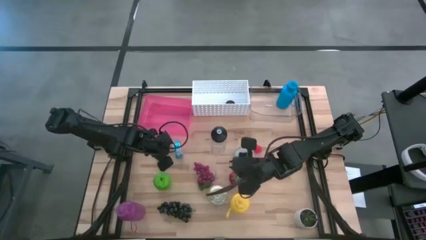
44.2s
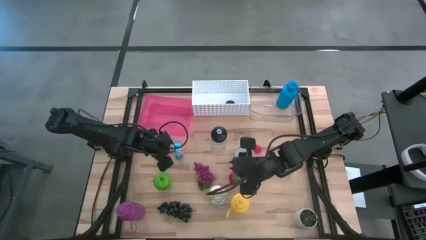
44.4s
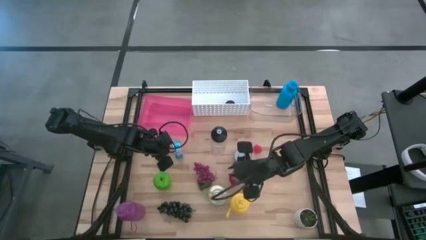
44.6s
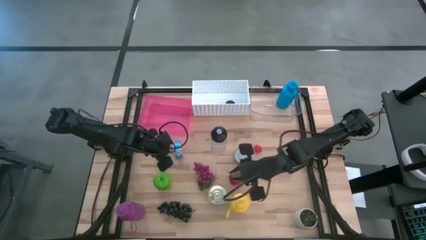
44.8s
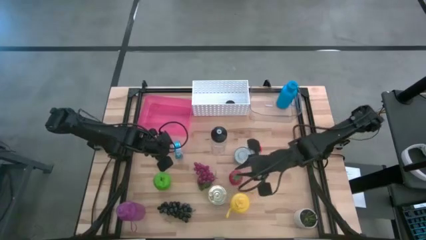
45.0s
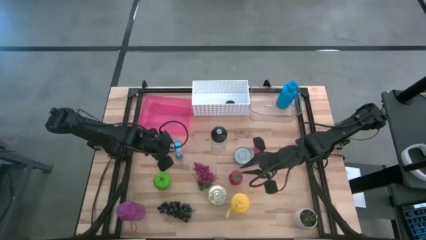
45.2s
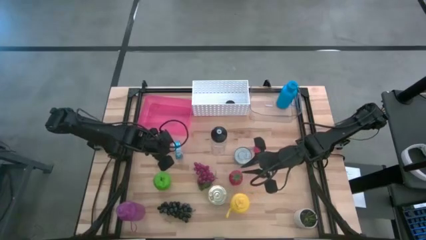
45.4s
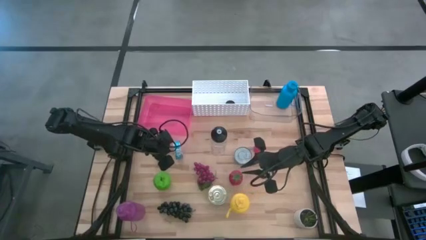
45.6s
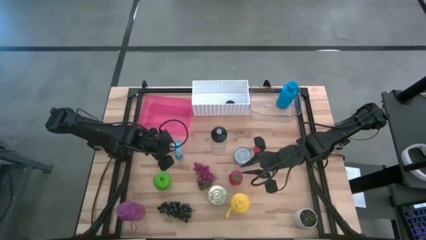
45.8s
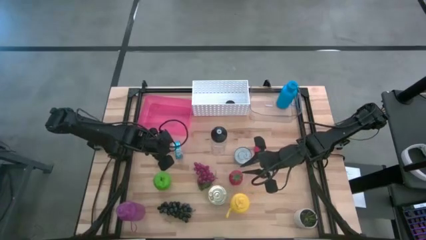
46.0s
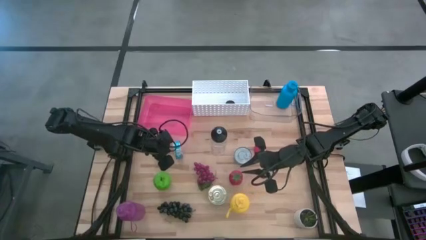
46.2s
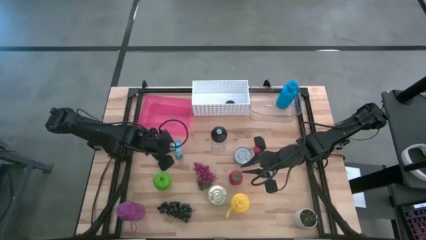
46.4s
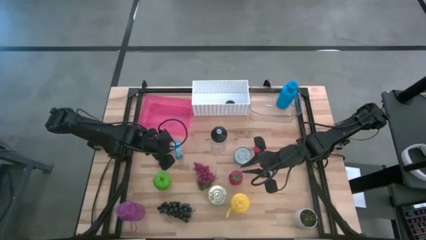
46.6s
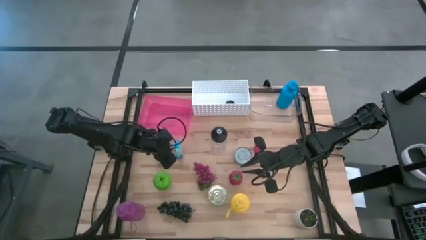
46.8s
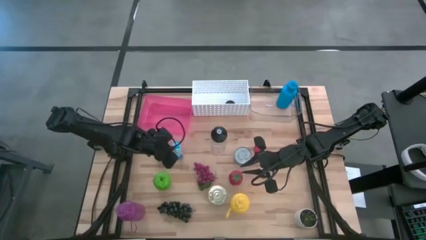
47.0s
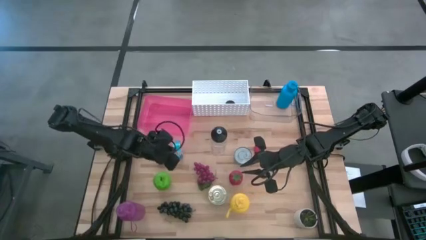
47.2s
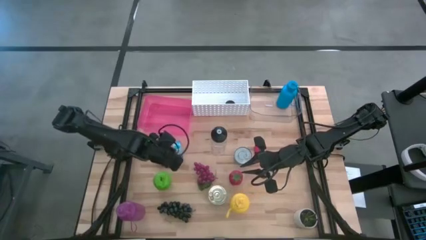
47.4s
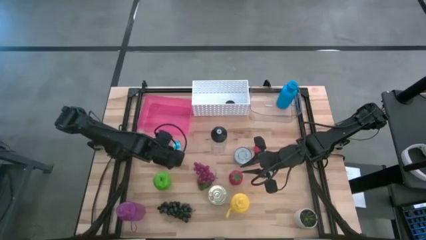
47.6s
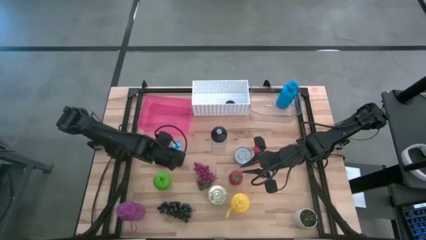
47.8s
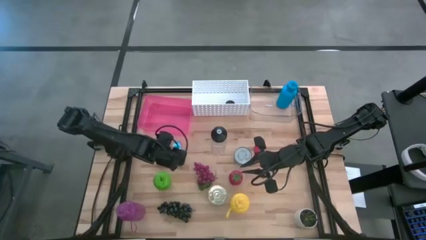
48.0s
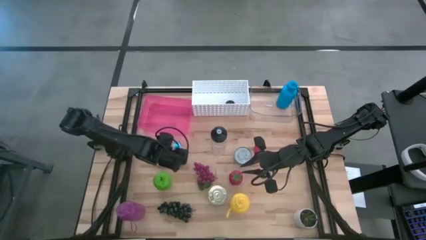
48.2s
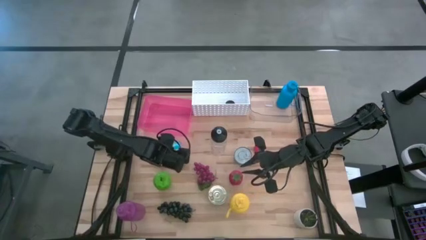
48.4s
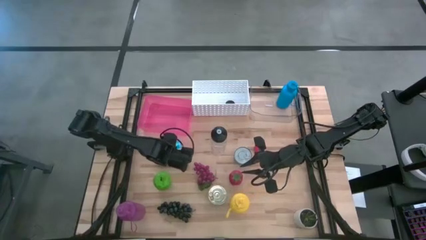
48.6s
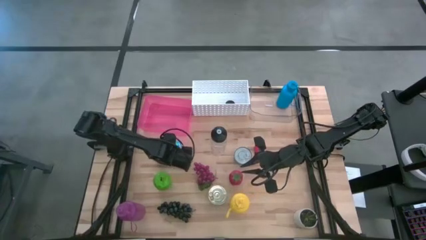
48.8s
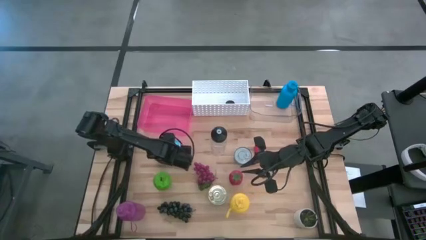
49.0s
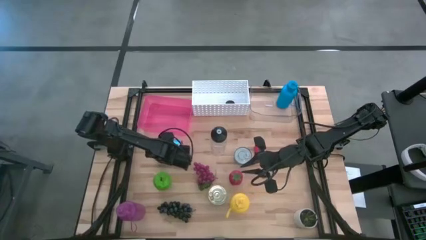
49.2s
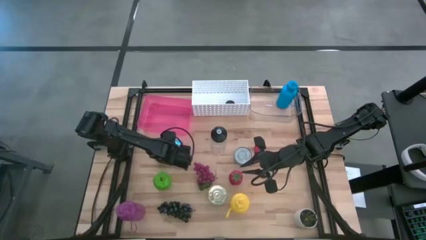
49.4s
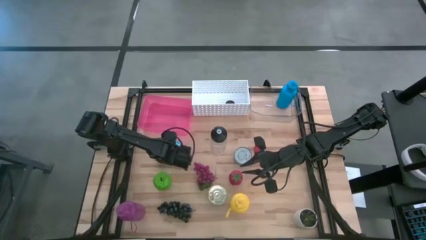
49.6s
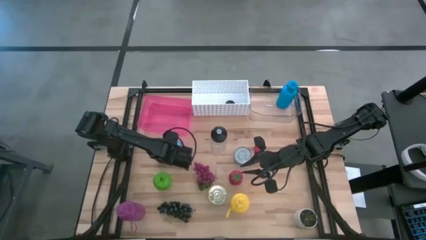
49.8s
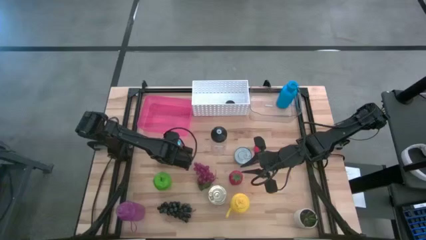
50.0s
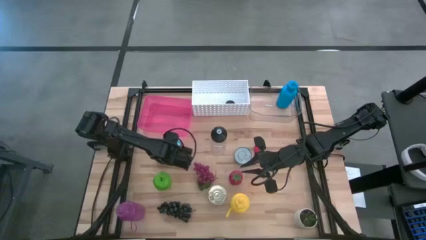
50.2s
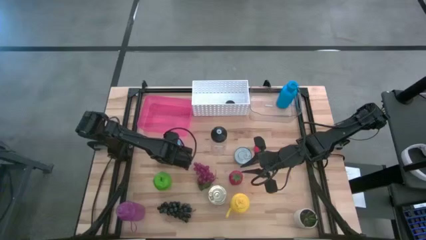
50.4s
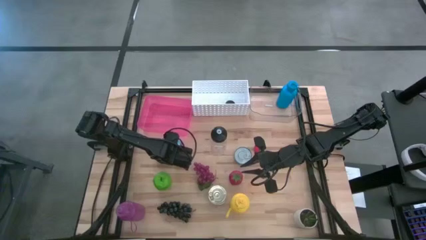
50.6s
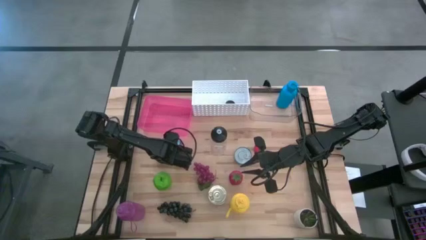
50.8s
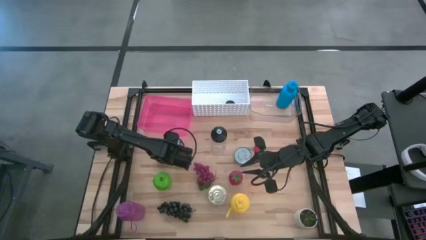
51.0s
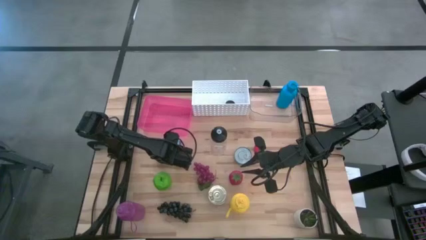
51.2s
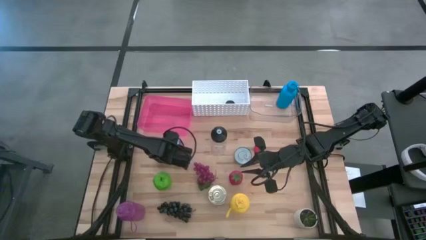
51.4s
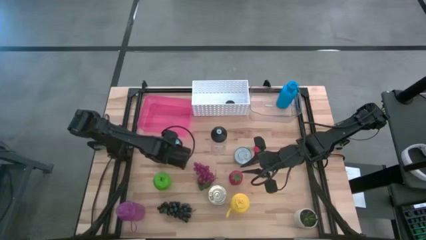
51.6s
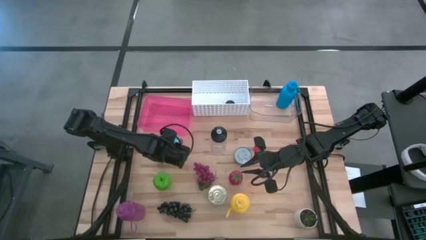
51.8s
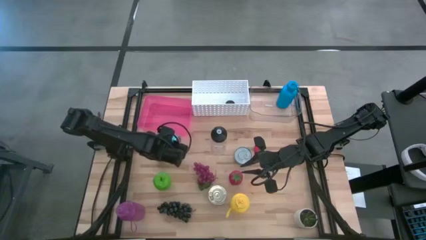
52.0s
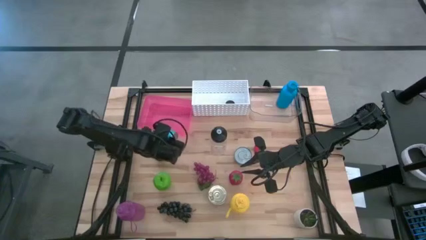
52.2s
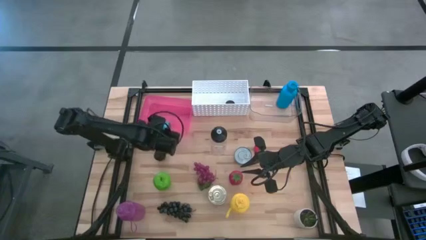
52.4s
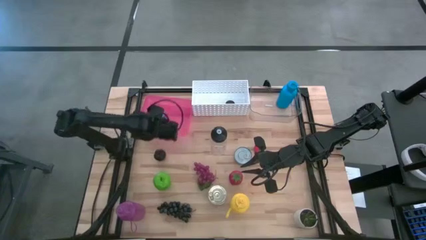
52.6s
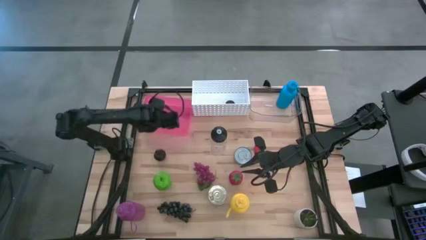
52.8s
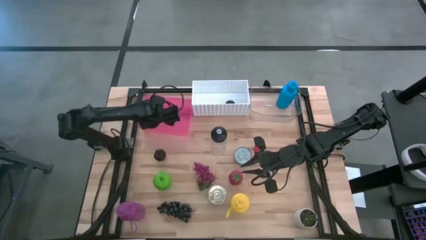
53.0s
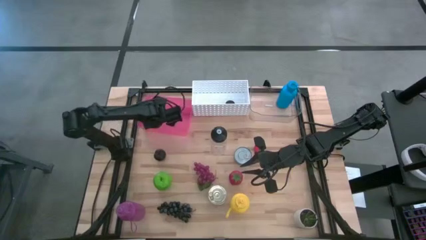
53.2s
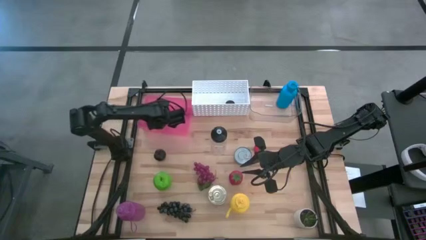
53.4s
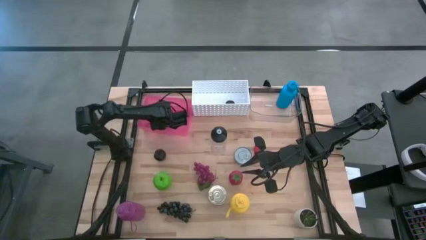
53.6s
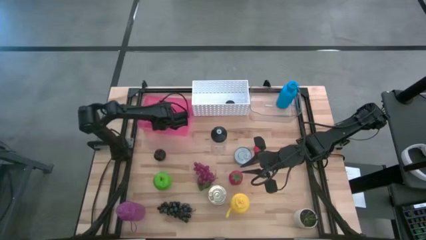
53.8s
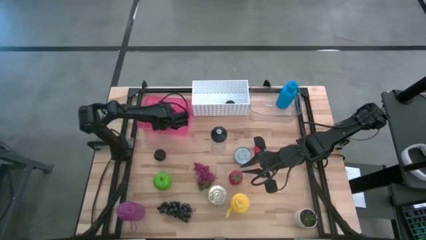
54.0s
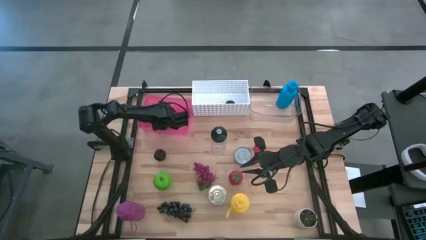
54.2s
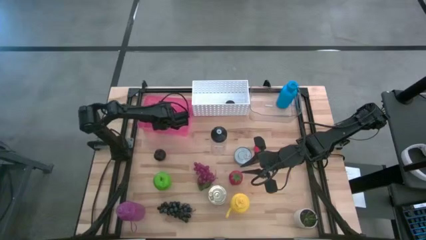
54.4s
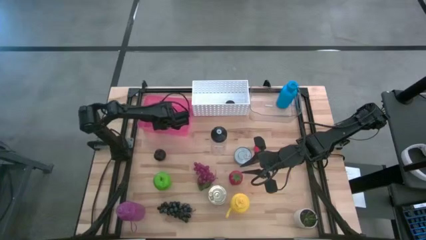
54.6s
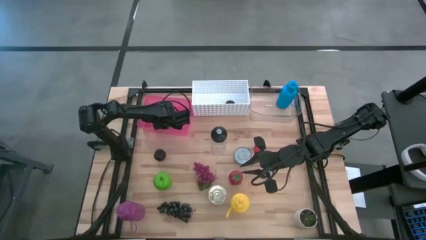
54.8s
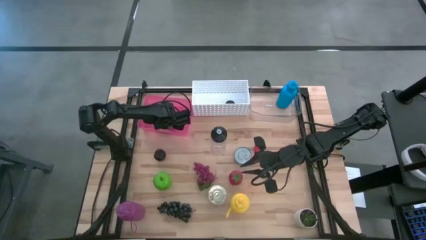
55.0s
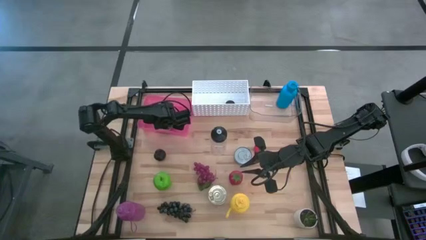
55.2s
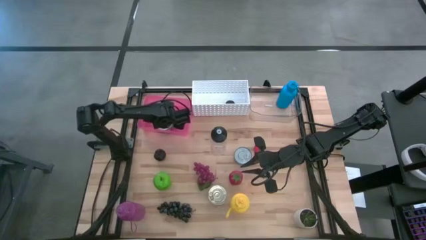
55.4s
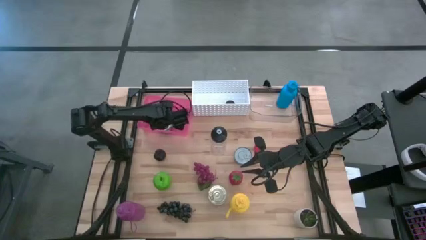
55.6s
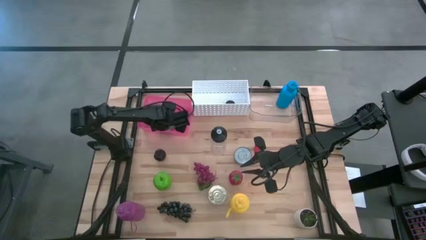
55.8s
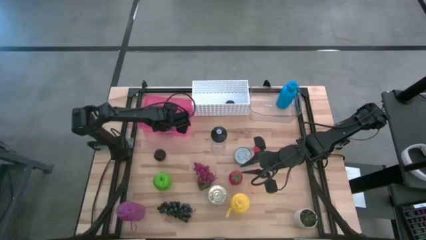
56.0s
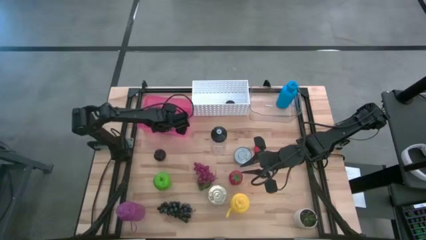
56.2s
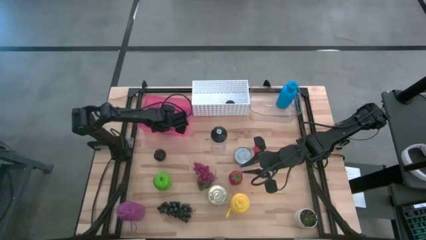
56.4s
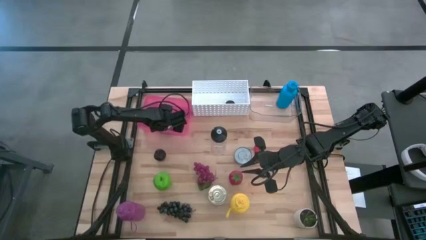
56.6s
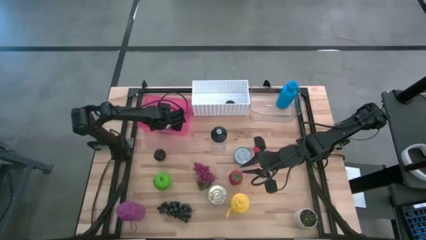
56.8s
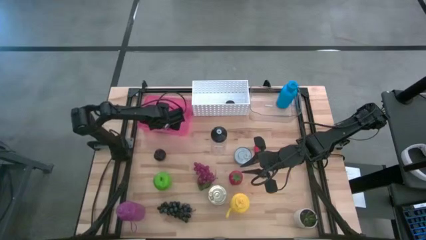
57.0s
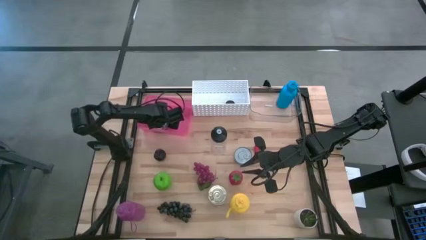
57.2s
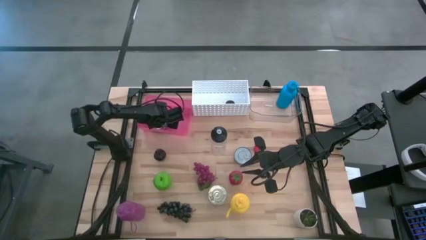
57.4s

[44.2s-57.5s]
Task: Pick & Place Food Item
Put the yellow tuna can into the pink bin
